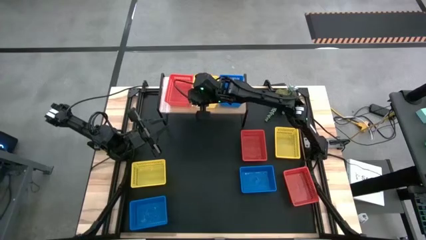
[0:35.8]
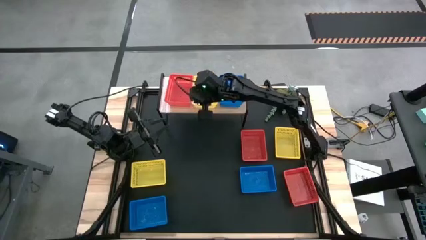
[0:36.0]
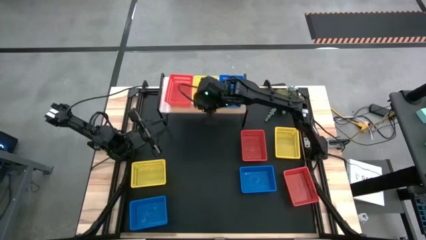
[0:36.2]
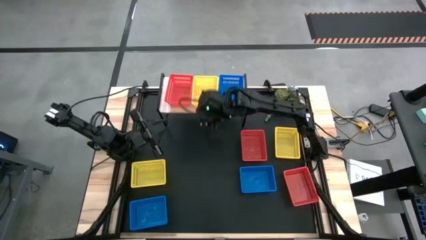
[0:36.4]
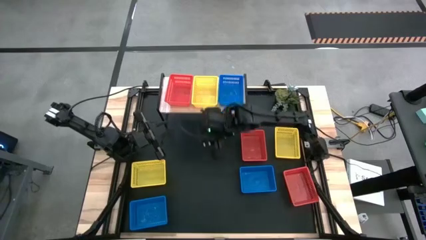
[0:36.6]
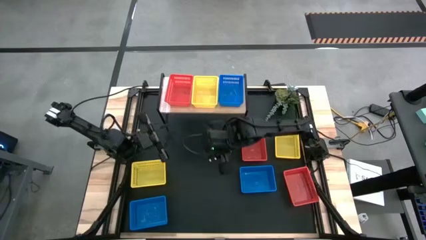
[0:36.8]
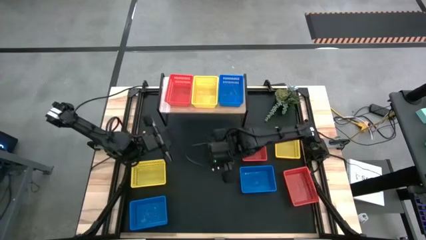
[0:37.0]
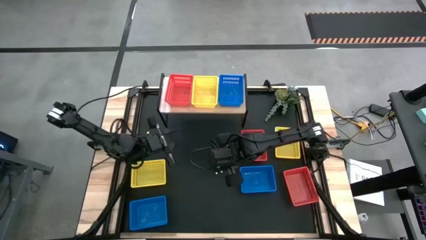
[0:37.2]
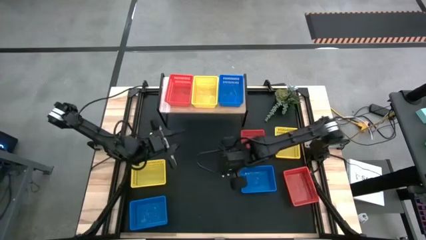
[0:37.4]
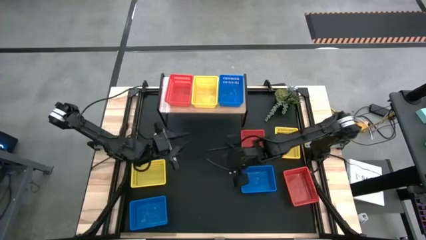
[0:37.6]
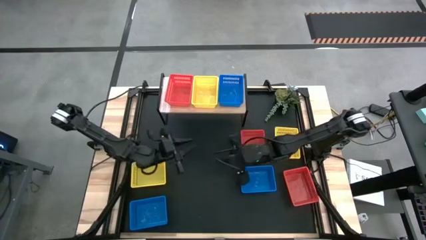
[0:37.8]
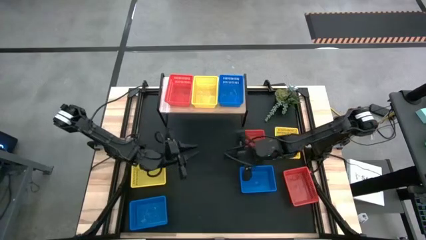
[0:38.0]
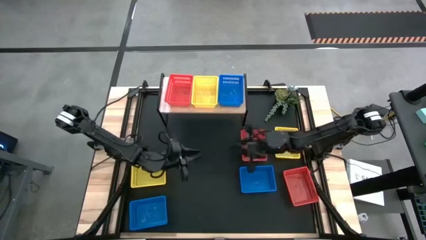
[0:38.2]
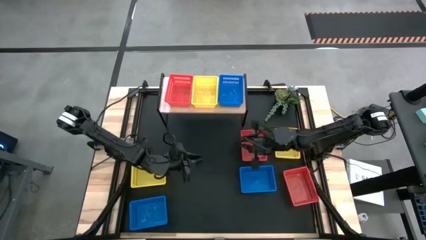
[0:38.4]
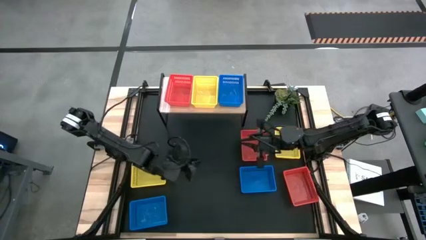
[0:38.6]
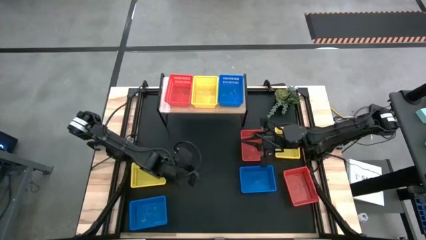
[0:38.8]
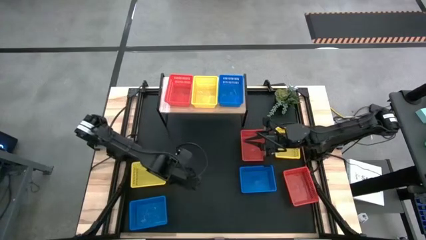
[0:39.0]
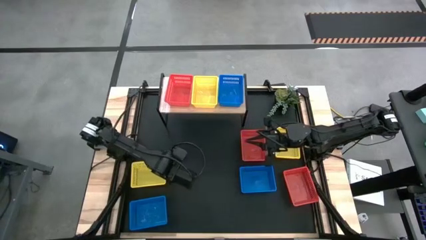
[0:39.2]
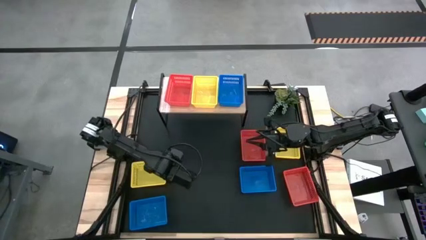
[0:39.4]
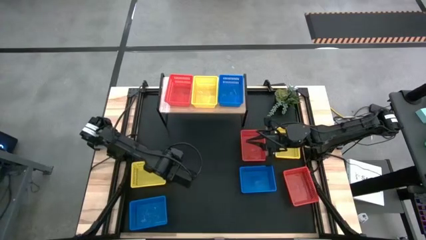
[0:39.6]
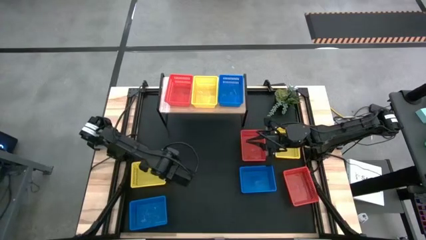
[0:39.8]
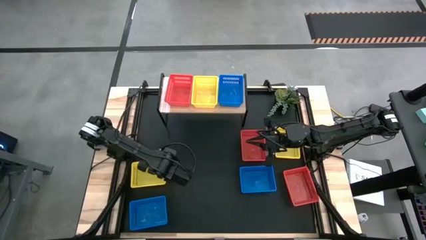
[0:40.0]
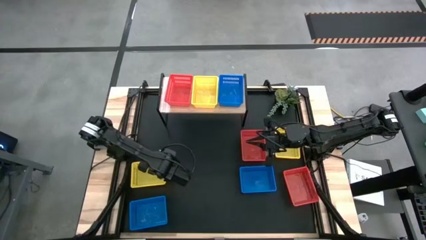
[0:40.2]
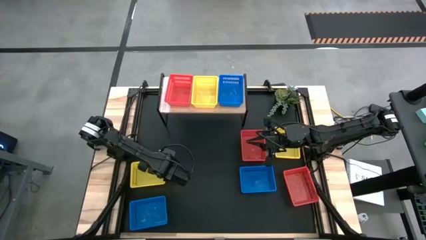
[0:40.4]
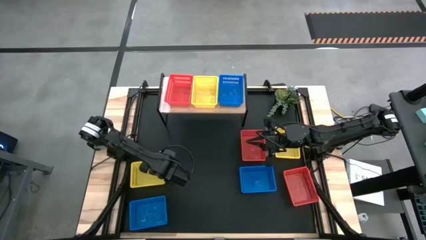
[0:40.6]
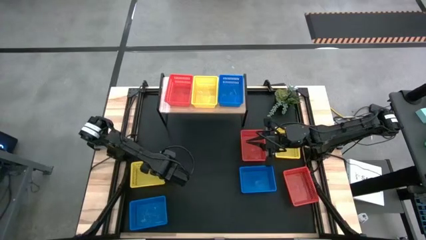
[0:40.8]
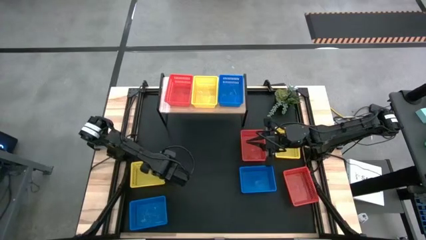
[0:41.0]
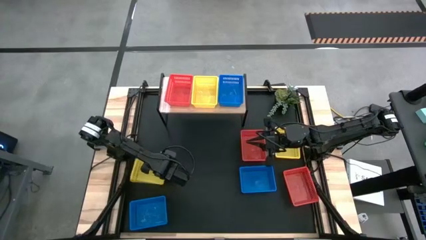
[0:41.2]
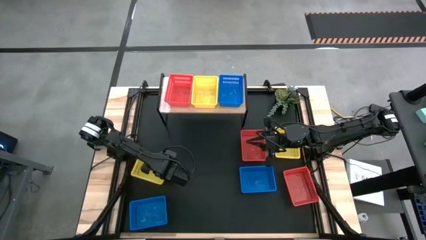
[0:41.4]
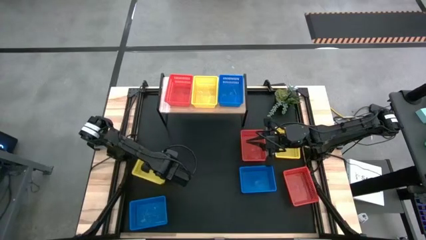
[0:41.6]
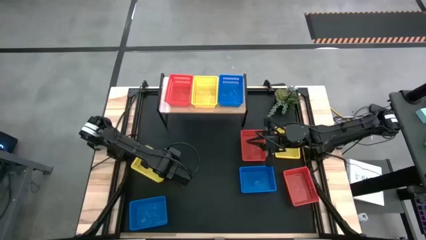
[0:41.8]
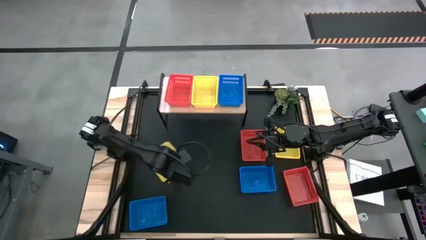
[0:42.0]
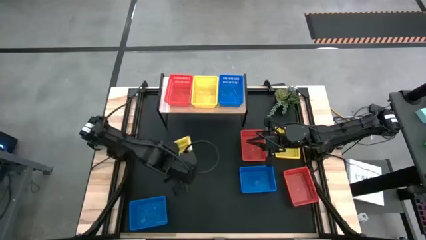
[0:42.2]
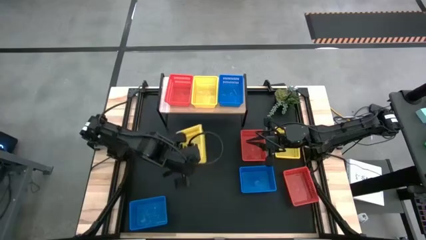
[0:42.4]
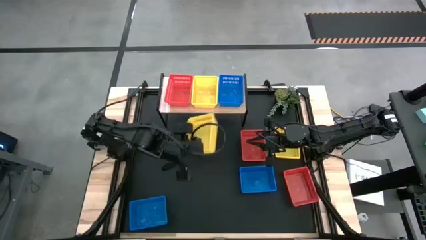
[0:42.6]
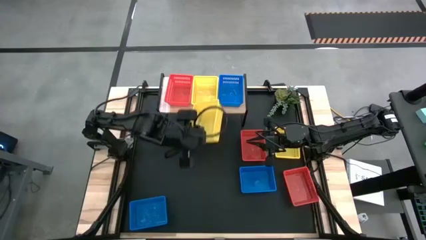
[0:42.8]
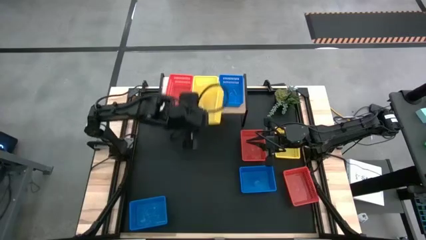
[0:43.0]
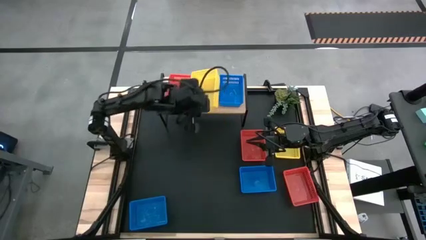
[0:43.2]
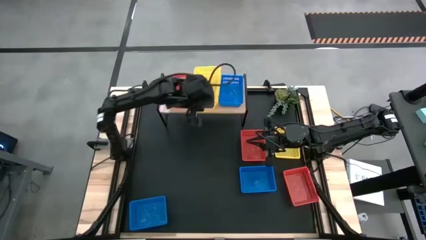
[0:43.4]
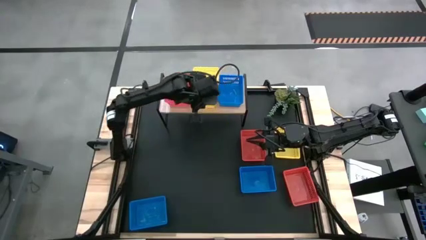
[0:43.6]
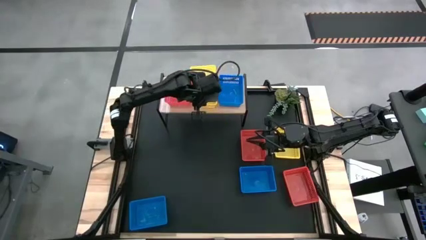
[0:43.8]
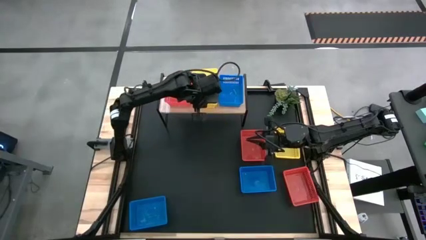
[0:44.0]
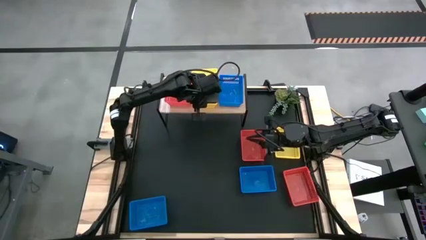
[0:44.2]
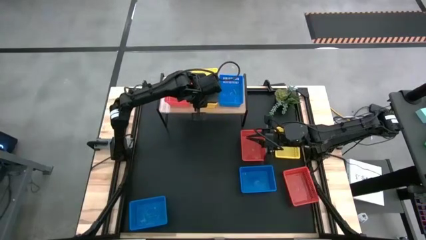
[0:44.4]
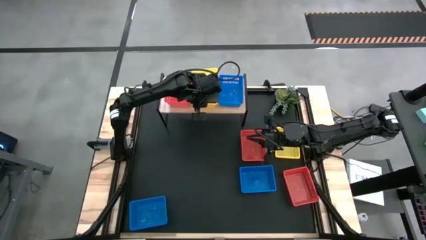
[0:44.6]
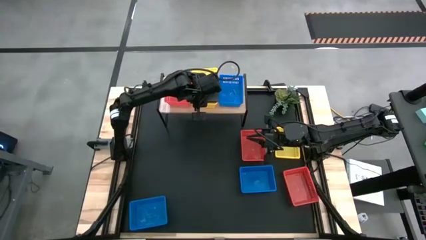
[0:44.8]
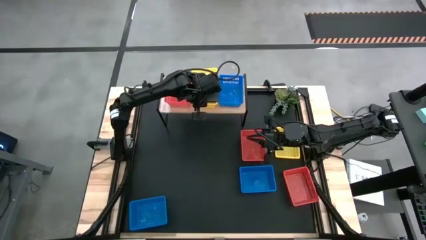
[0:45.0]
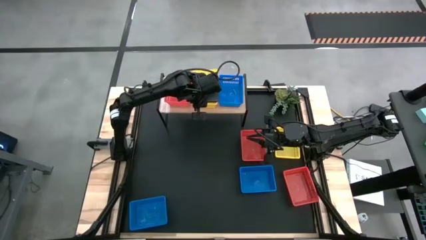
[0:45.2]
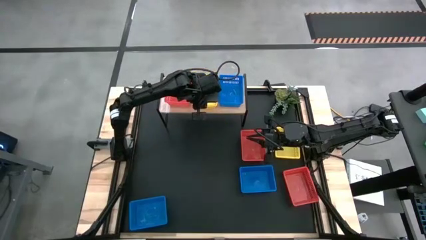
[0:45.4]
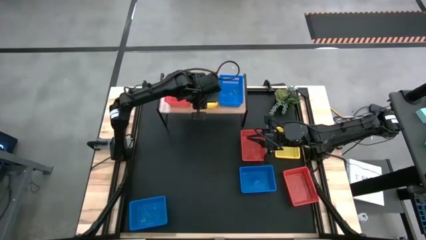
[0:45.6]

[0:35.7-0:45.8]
Task: Stack baskets on shelf by color
Stack the left yellow bin on top of the yellow bin on the shelf

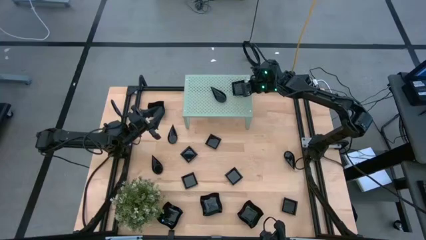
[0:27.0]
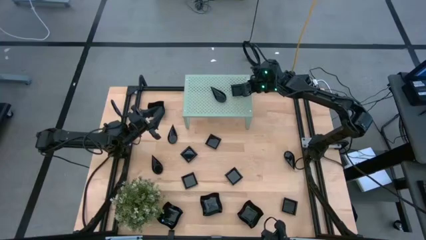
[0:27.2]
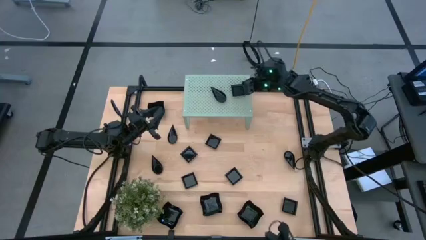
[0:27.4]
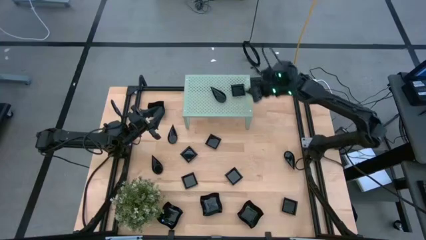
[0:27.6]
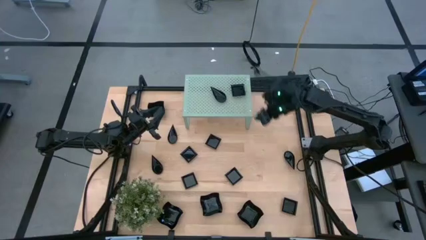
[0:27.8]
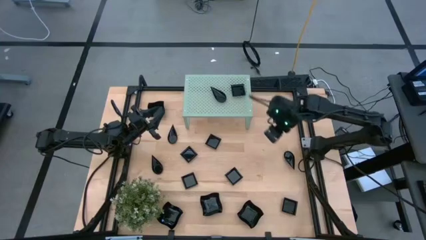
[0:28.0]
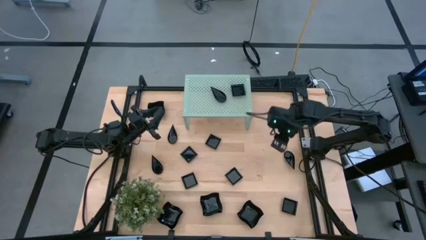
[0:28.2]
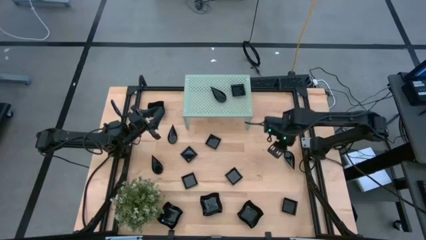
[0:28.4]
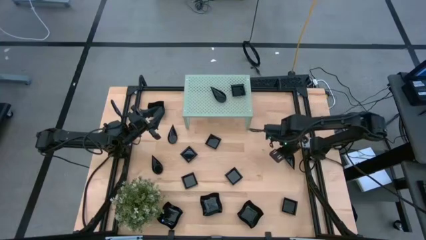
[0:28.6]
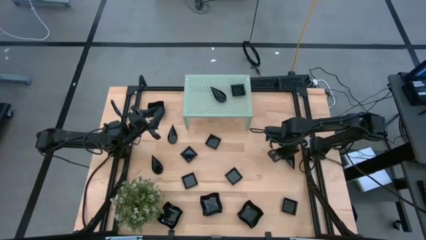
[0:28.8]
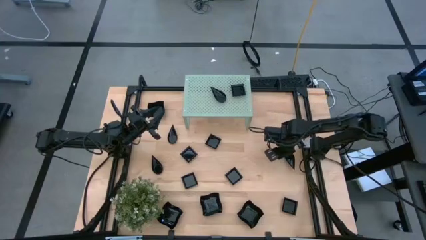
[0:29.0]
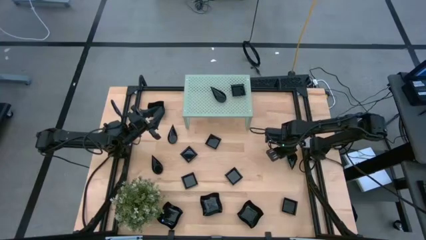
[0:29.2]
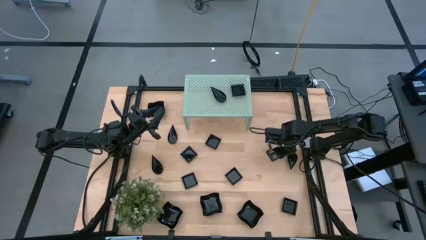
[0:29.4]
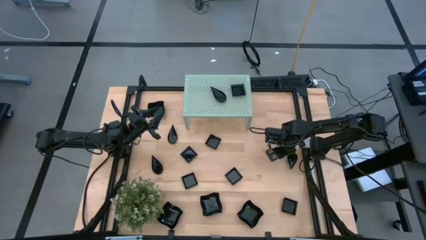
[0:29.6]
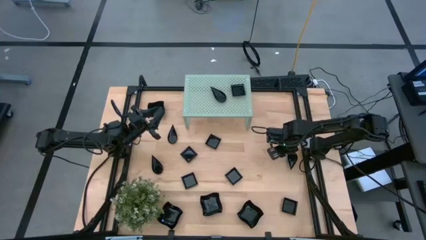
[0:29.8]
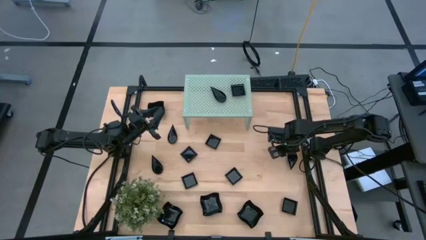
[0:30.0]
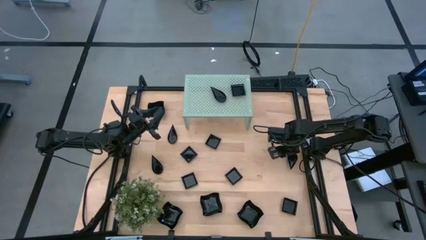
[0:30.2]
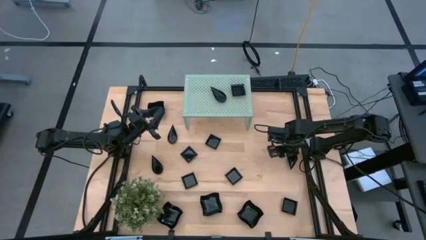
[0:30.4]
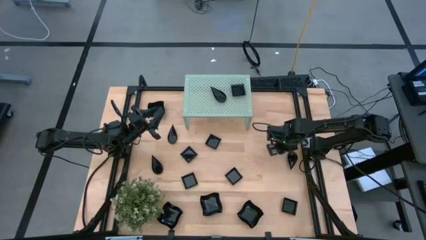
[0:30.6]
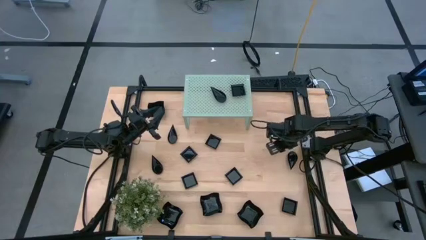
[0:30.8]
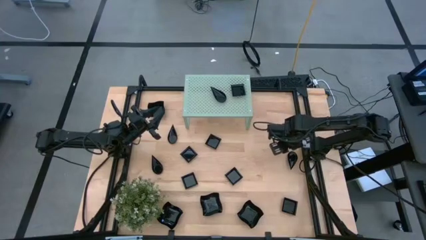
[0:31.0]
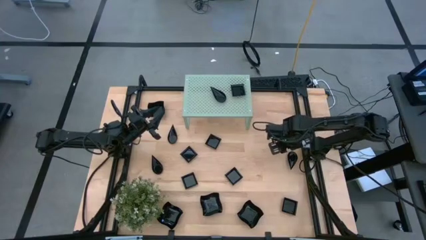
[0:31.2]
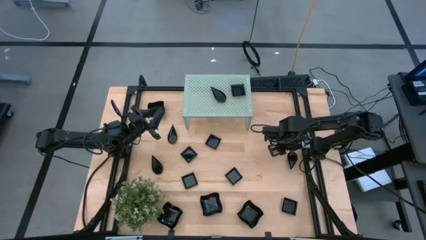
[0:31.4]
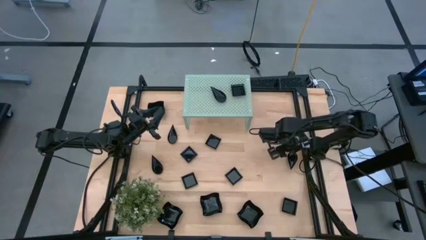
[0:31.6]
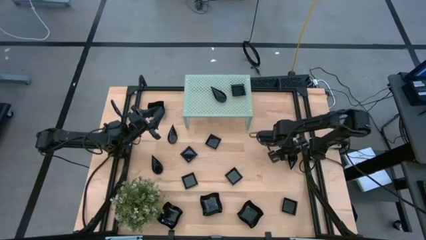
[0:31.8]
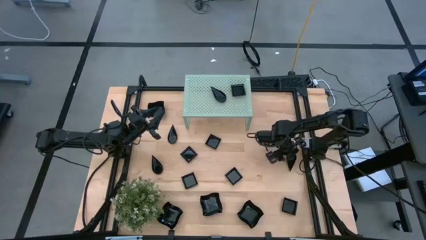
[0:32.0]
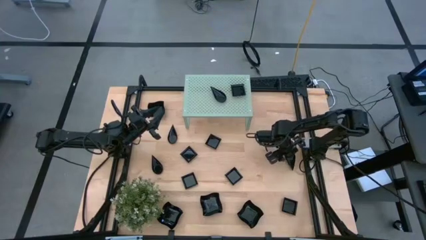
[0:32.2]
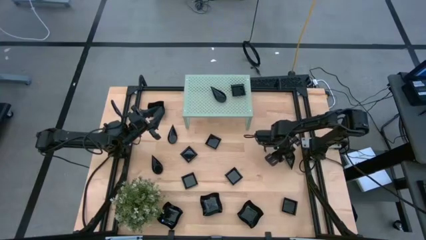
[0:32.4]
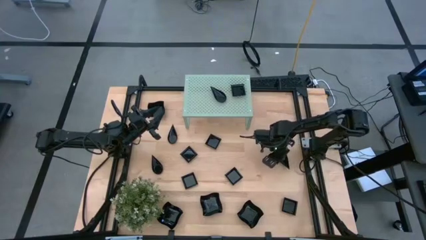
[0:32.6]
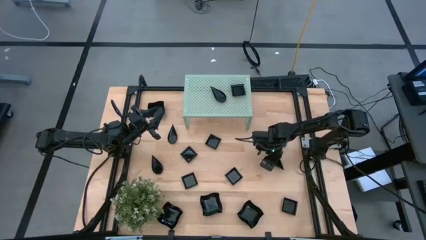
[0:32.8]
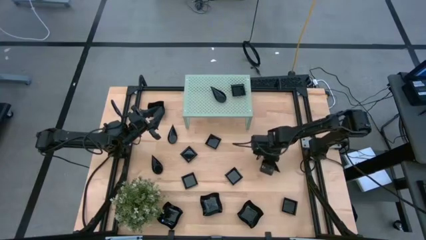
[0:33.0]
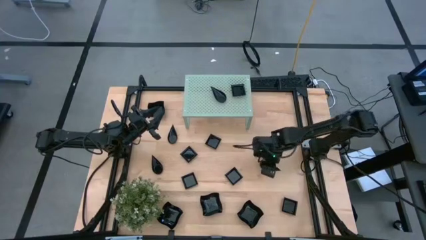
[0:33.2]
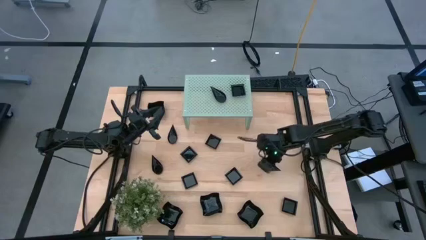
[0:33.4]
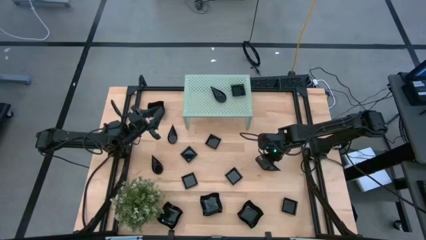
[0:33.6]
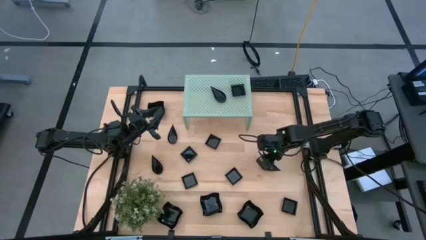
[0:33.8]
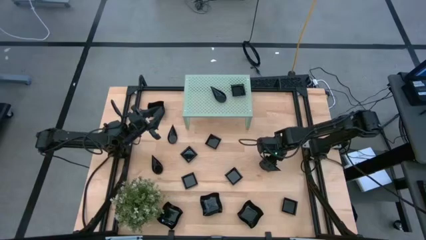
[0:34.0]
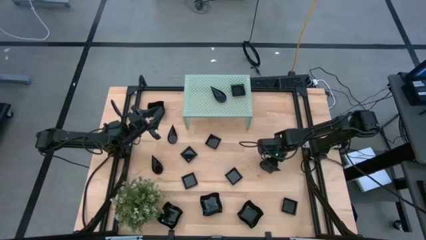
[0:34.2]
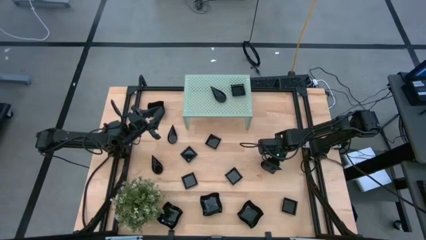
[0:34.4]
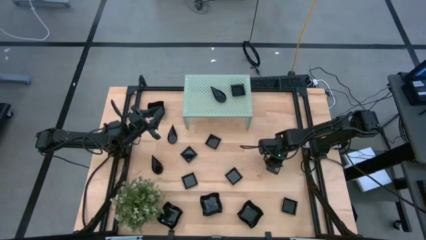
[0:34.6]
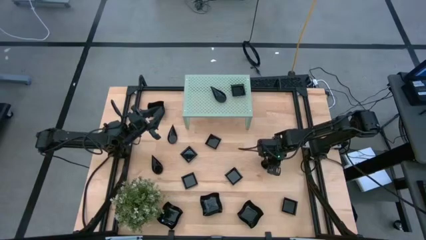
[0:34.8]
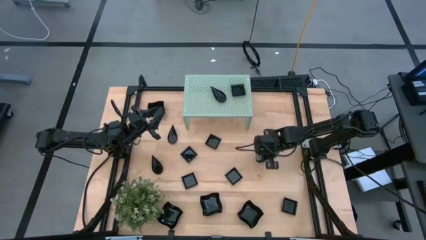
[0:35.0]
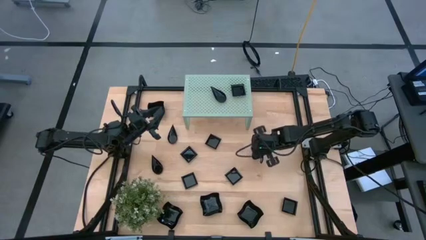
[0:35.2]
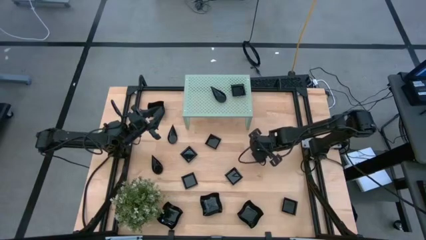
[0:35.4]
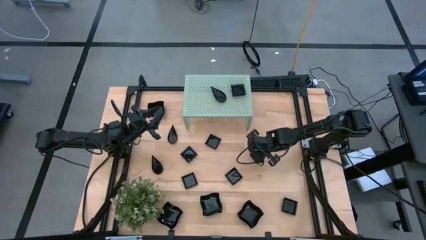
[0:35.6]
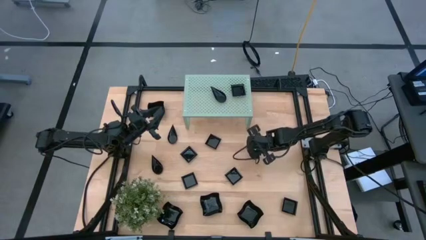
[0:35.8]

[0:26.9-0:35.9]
Task: Pick & Place Mini shaped plates
Stack the black drop-shaped plate on the shelf
